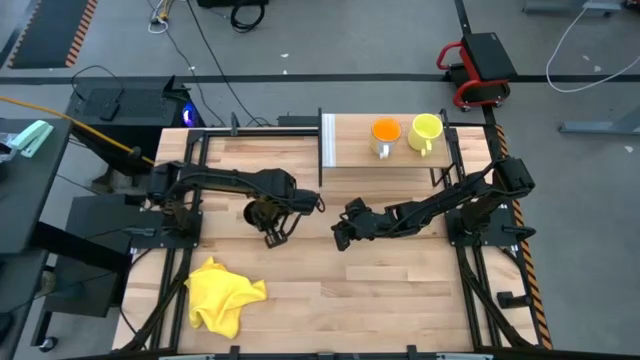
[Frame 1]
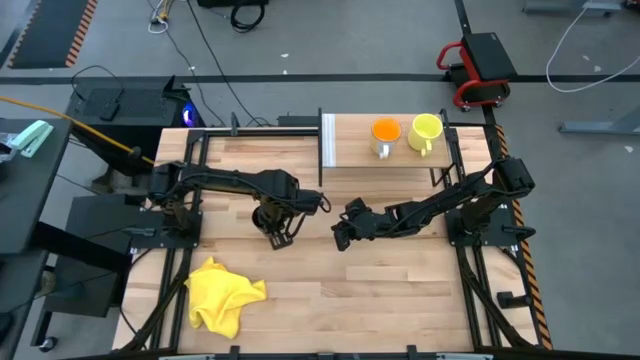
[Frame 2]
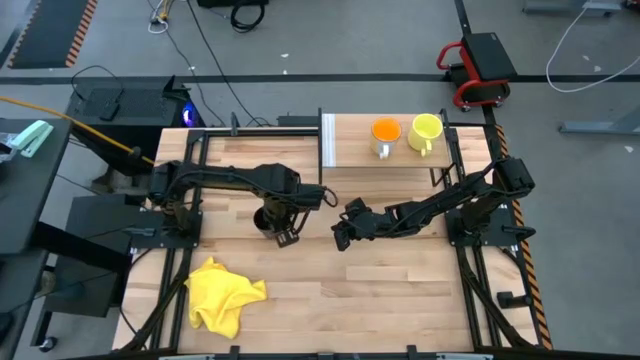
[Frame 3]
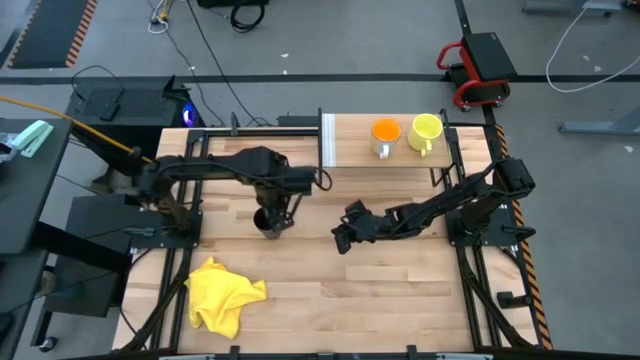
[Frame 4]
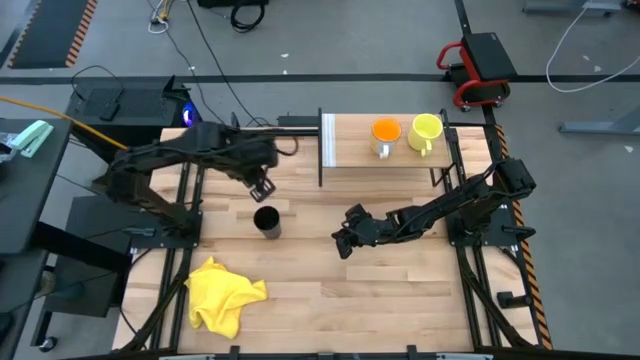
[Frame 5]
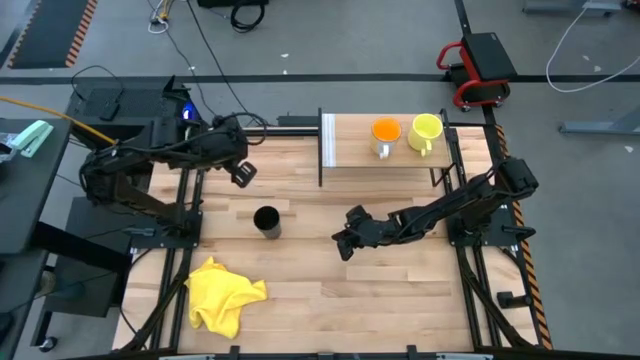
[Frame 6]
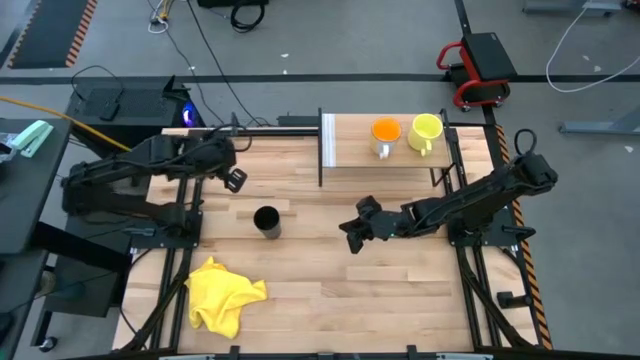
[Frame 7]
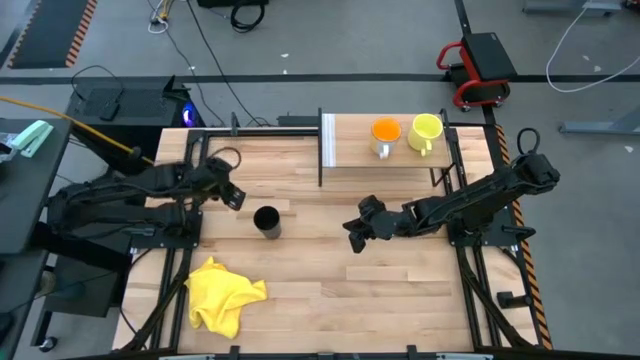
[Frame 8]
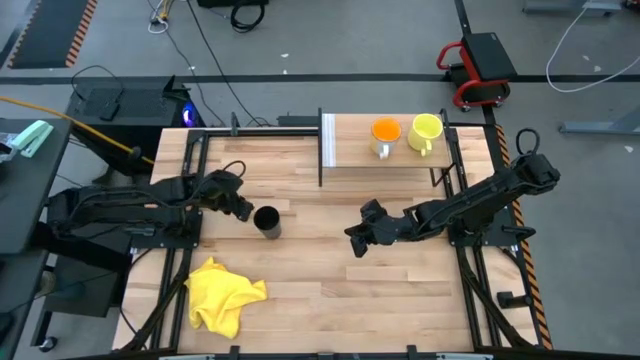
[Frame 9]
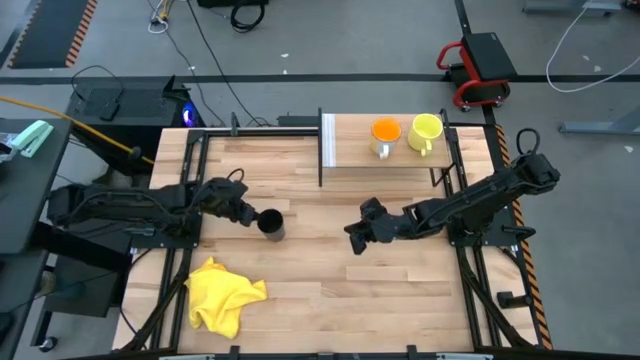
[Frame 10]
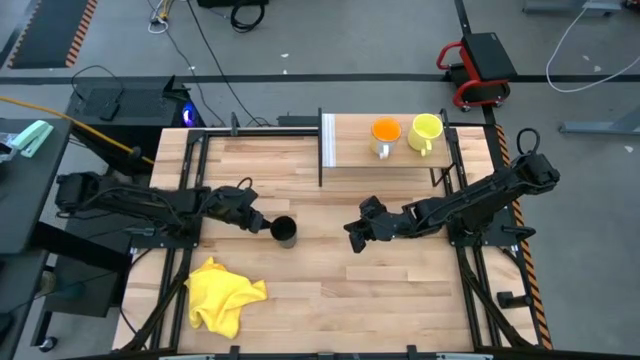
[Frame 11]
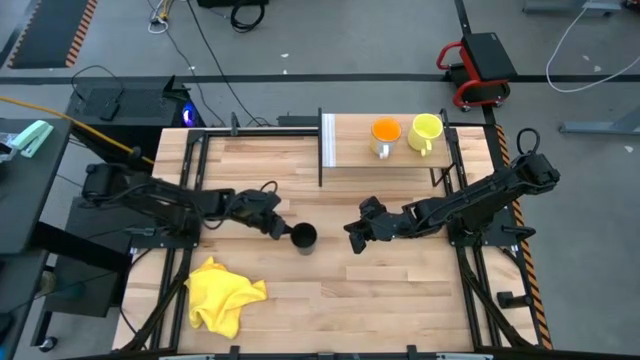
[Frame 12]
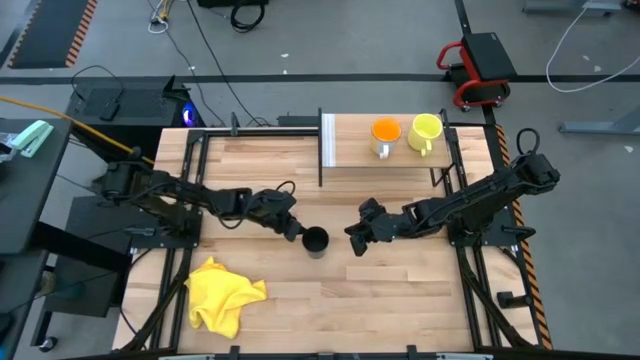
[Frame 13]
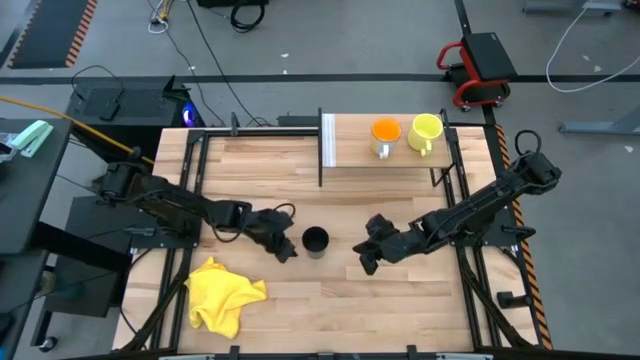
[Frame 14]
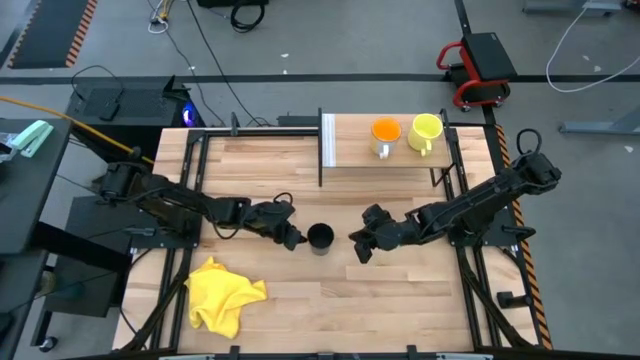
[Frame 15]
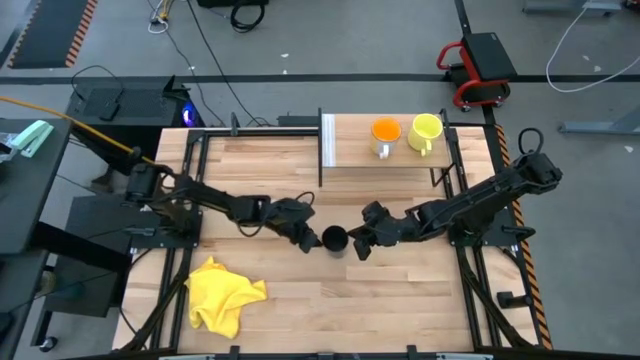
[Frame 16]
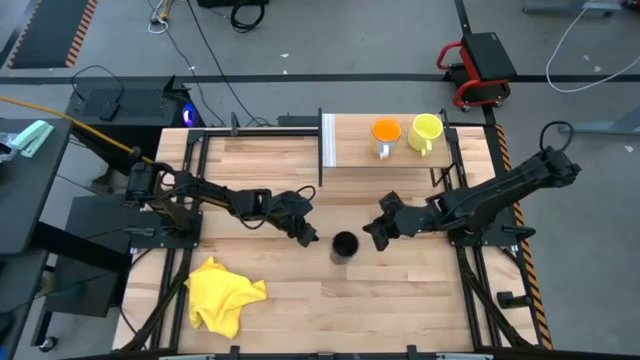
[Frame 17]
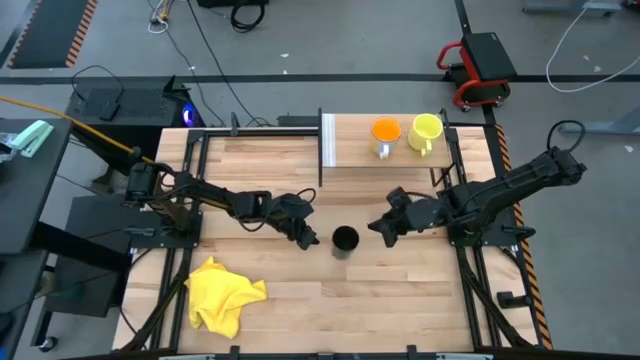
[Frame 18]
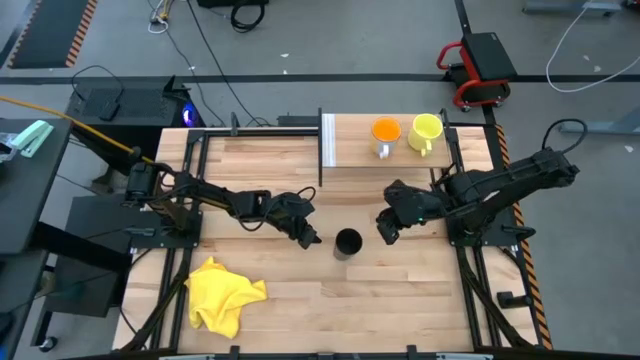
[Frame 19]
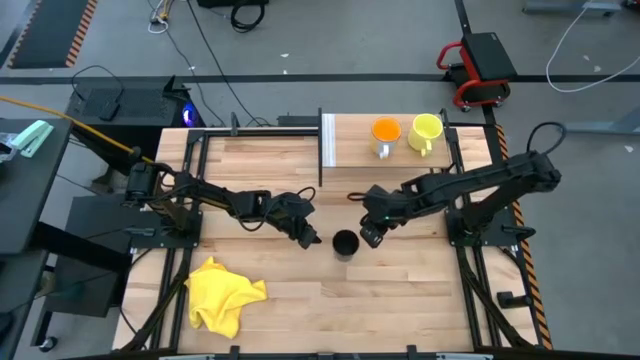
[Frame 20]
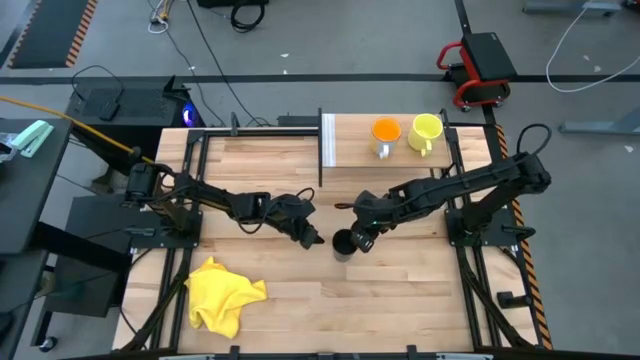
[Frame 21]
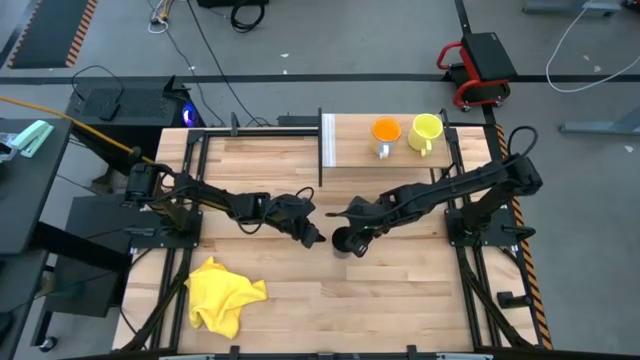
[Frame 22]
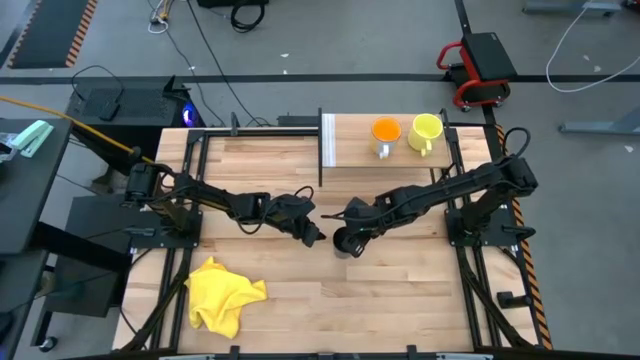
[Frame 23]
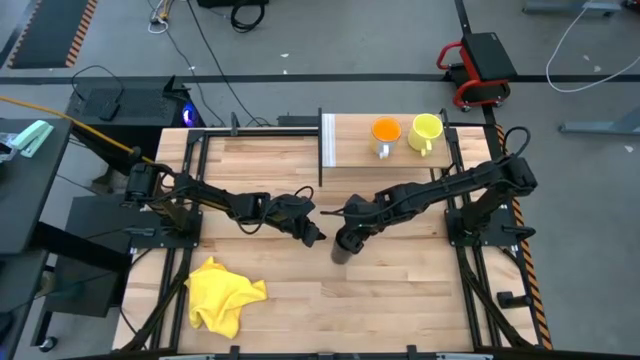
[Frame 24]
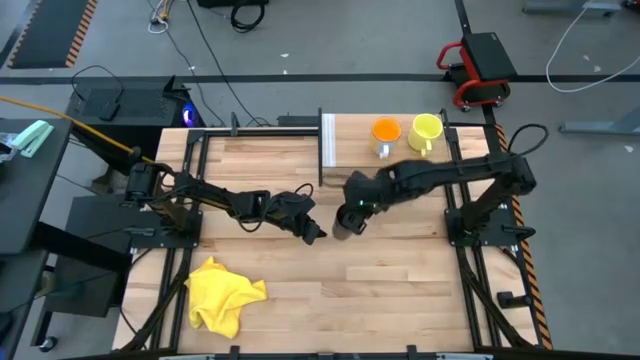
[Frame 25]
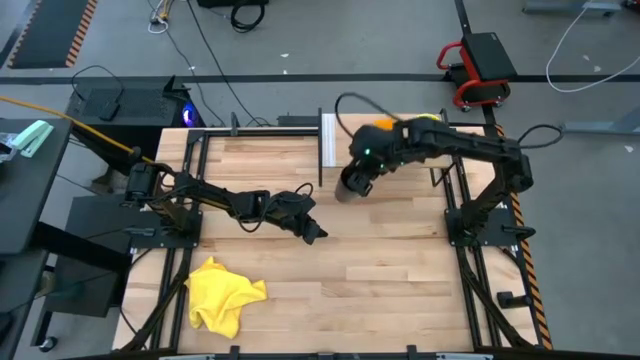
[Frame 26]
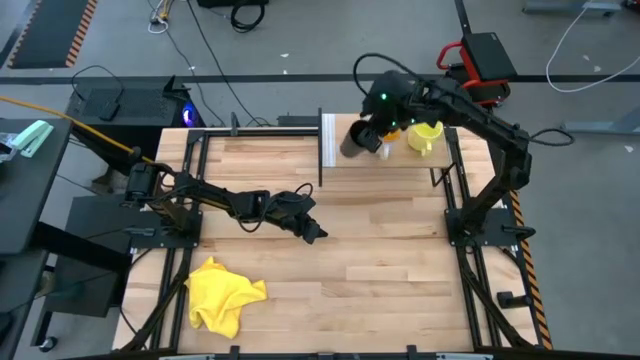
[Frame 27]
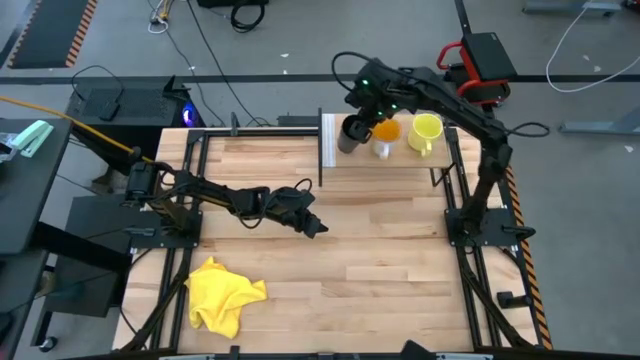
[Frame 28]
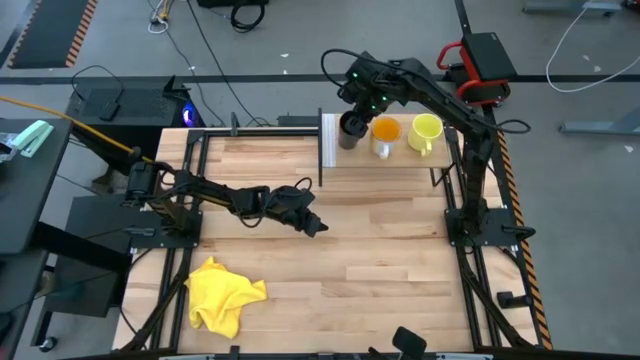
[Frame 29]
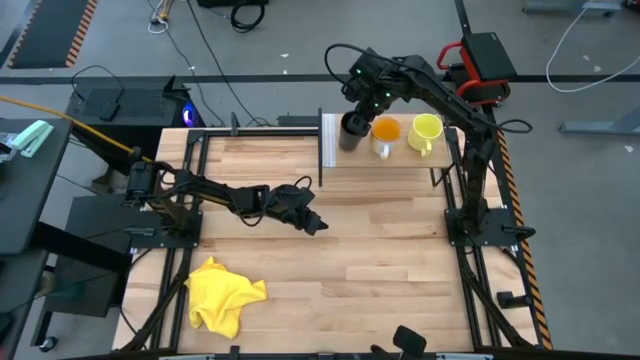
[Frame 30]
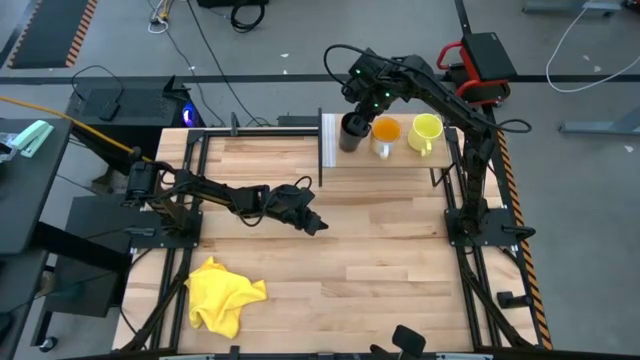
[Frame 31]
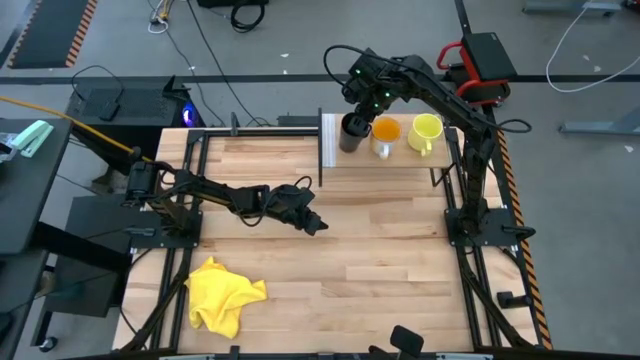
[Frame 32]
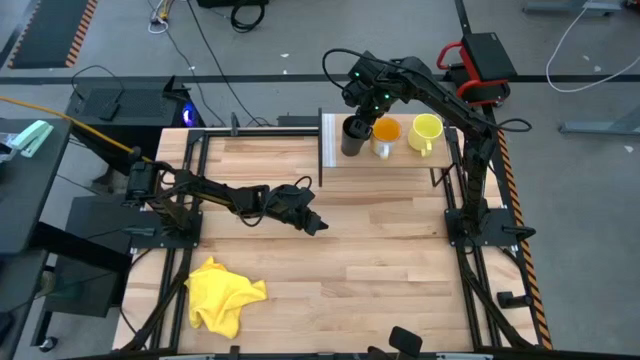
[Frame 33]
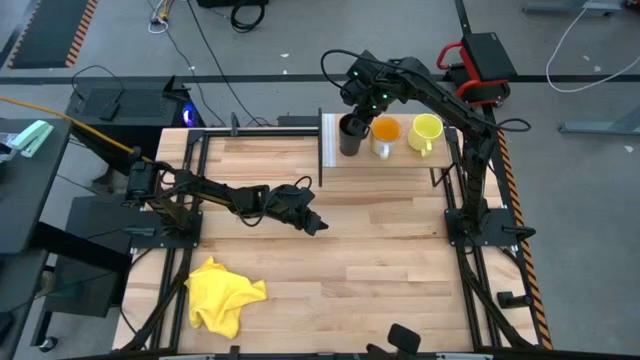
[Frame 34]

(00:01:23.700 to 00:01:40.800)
Task: Stack small to large cups/mugs on shelf
Put the black cup on the shelf

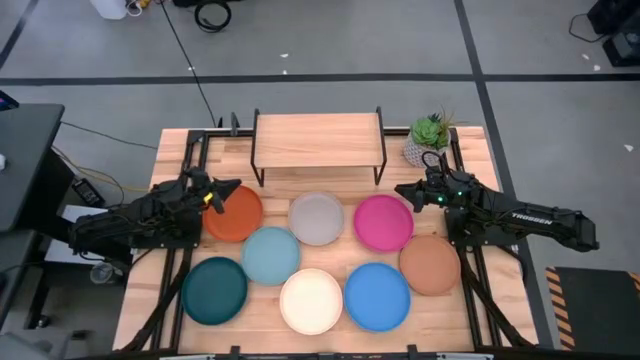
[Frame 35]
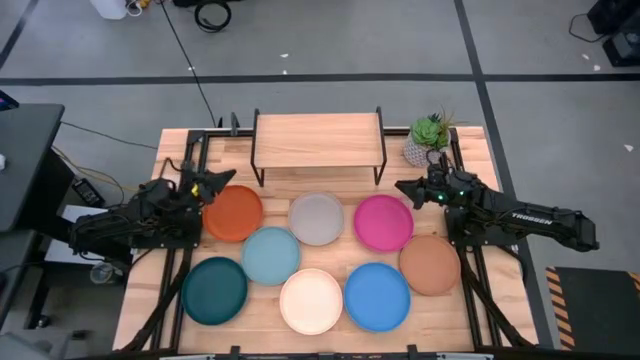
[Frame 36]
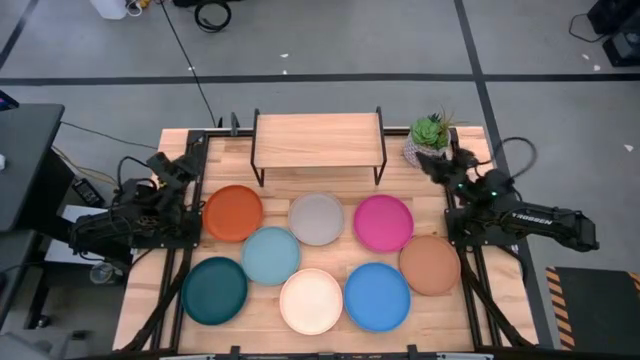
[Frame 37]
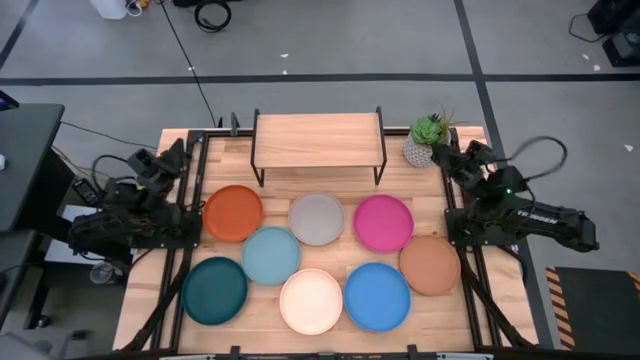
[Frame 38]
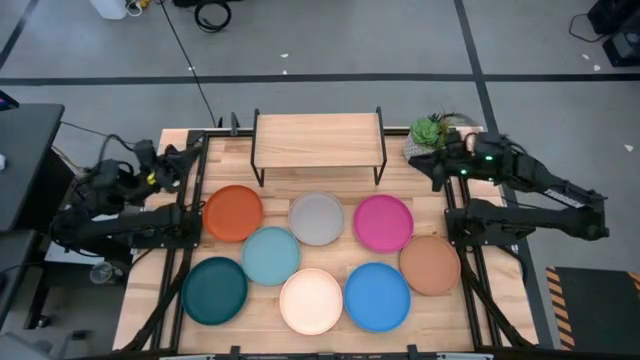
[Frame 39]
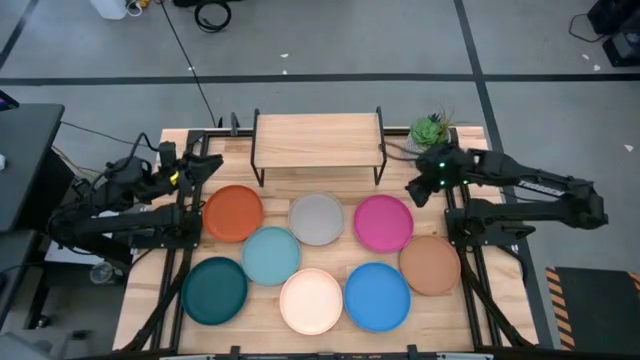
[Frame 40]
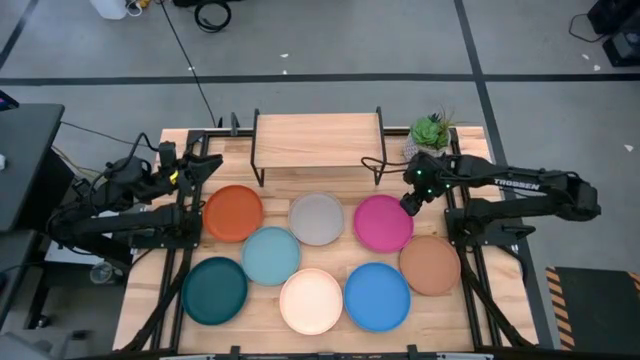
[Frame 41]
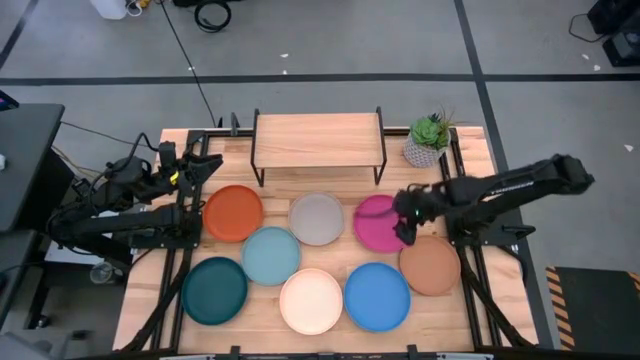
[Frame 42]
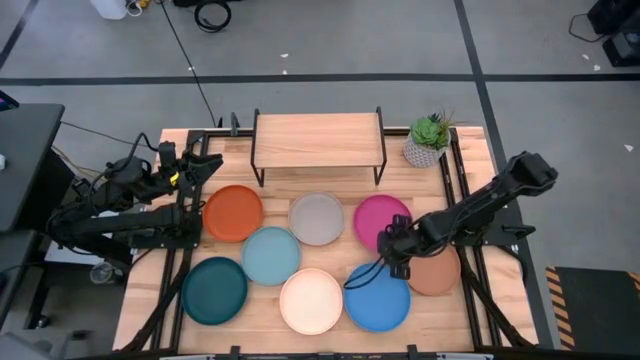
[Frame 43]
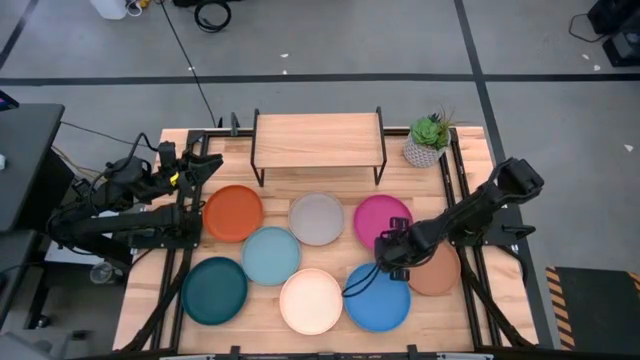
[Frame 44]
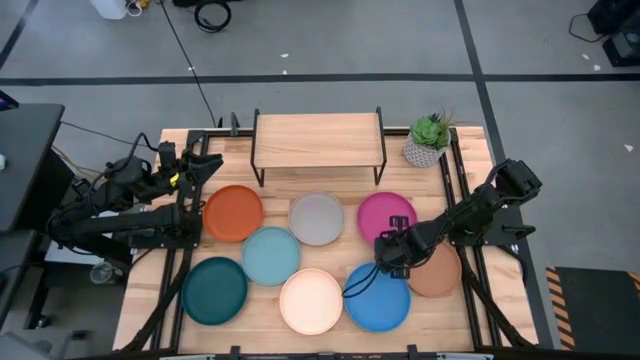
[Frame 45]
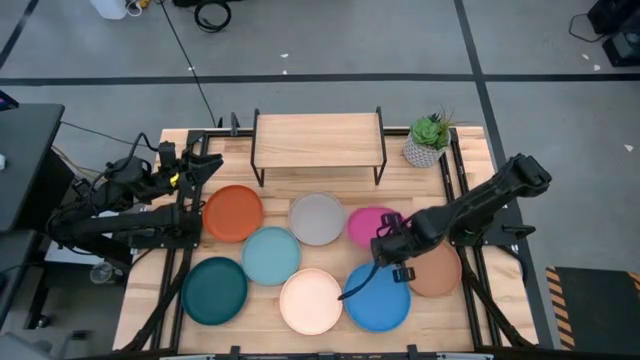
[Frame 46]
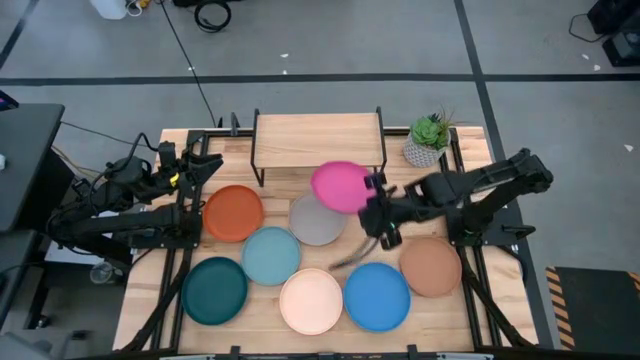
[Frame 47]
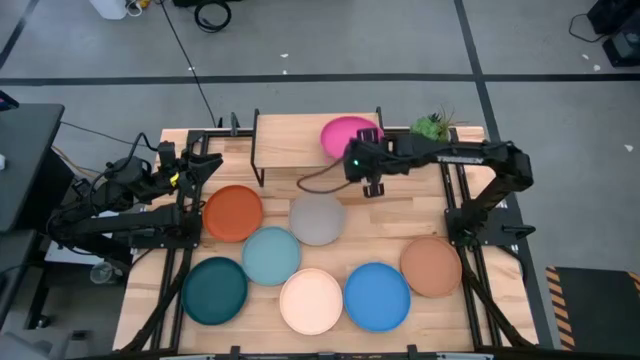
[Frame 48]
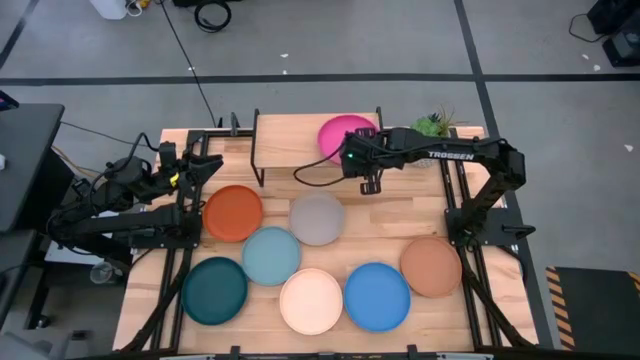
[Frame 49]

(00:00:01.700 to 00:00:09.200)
Task: Place and stack plates onto a shelf
Put the pink plate on the shelf
